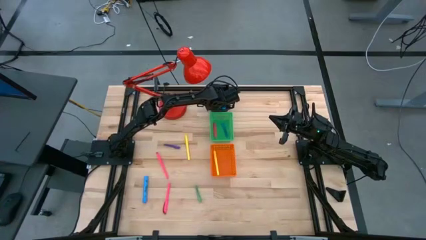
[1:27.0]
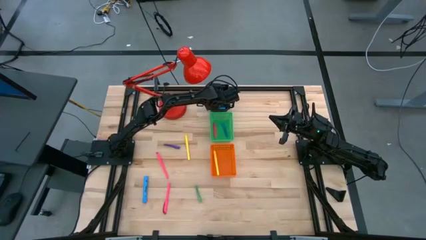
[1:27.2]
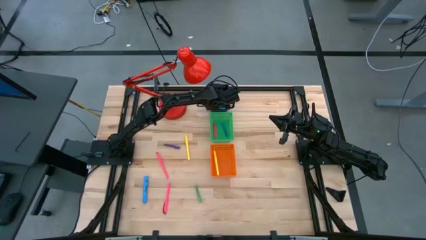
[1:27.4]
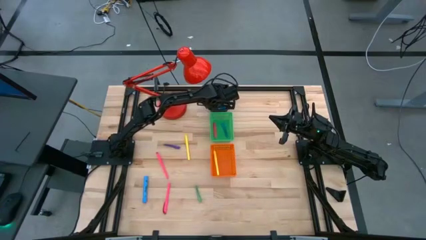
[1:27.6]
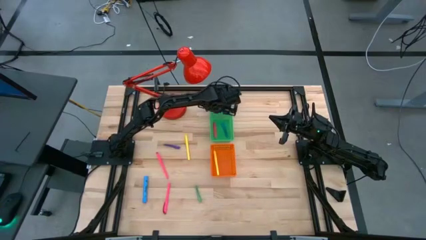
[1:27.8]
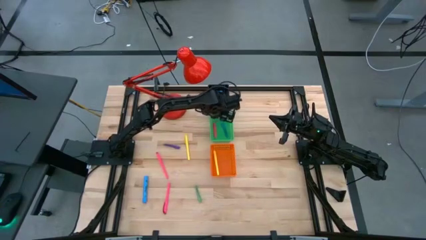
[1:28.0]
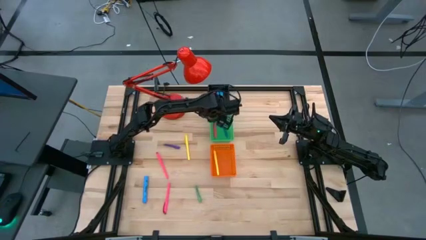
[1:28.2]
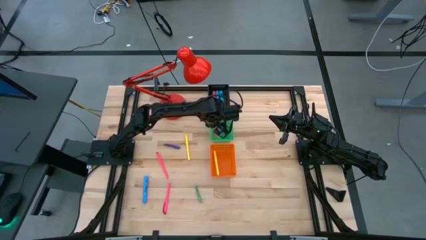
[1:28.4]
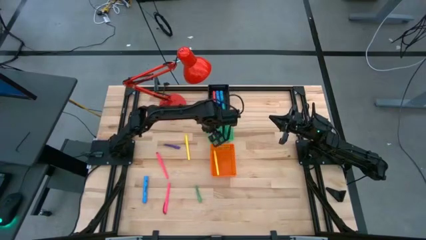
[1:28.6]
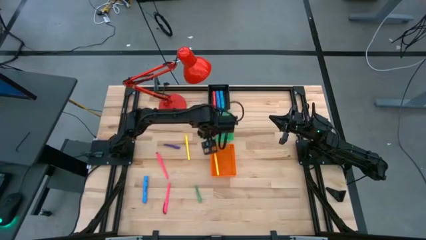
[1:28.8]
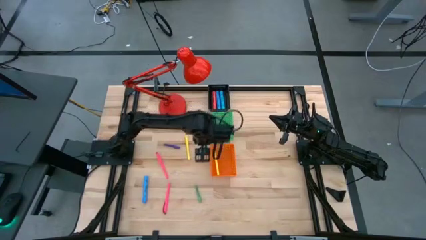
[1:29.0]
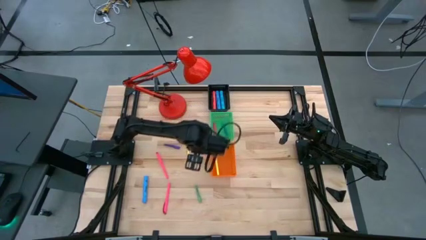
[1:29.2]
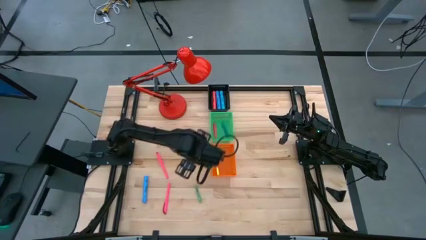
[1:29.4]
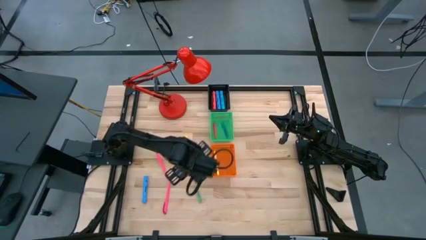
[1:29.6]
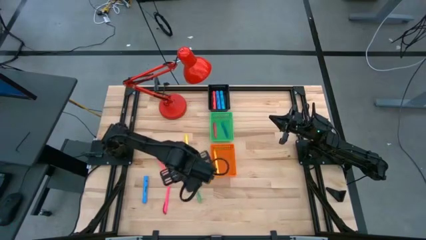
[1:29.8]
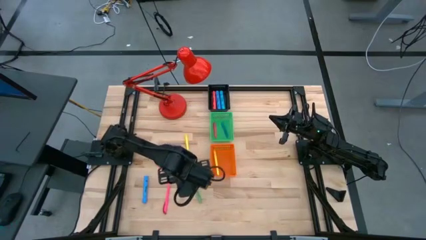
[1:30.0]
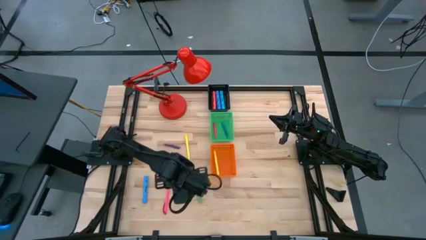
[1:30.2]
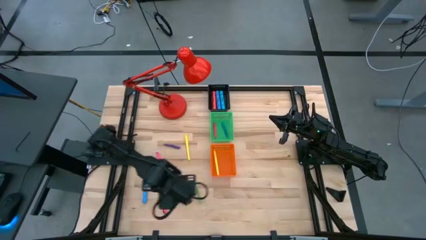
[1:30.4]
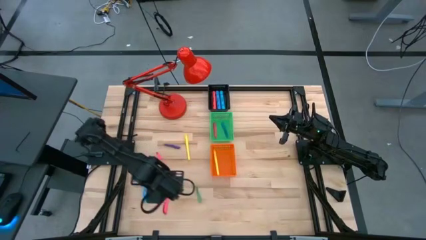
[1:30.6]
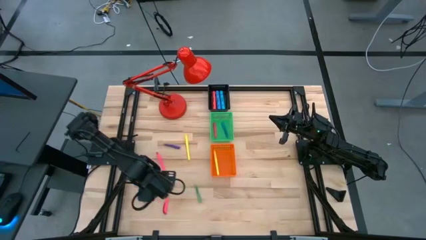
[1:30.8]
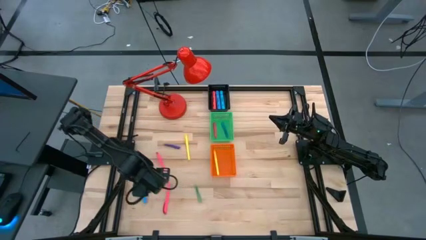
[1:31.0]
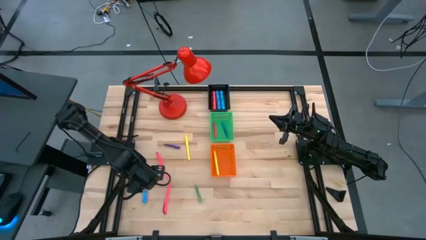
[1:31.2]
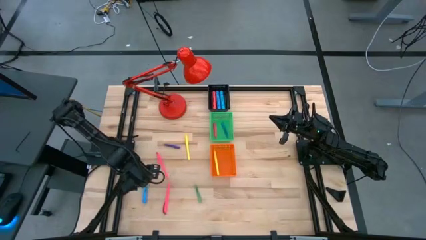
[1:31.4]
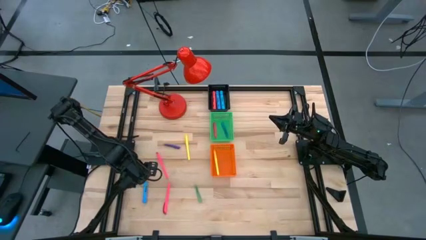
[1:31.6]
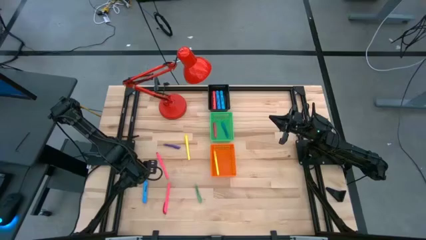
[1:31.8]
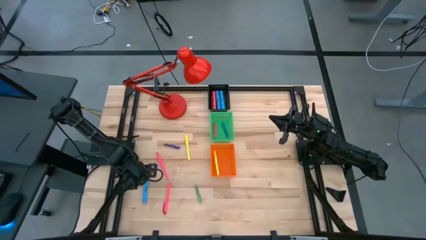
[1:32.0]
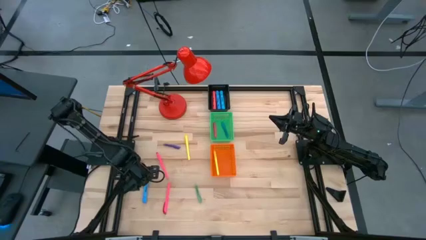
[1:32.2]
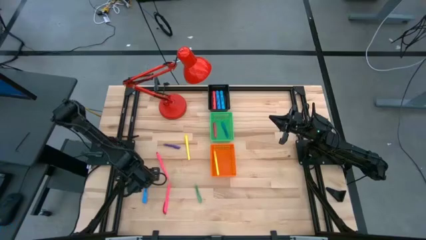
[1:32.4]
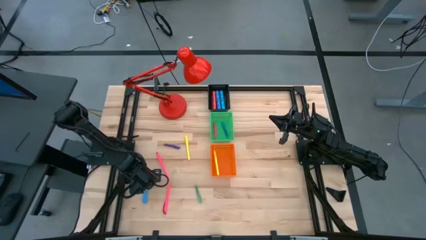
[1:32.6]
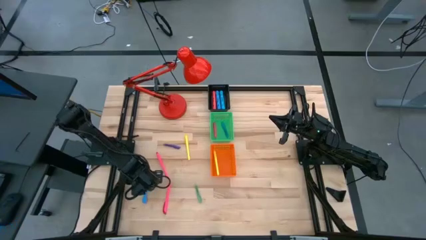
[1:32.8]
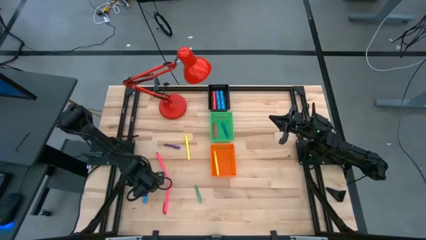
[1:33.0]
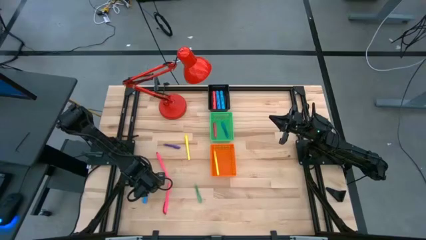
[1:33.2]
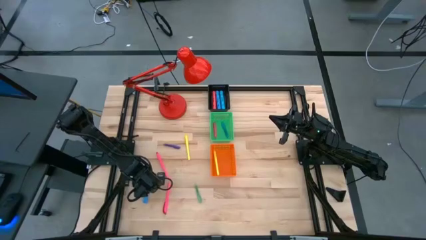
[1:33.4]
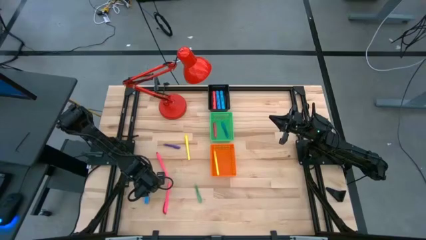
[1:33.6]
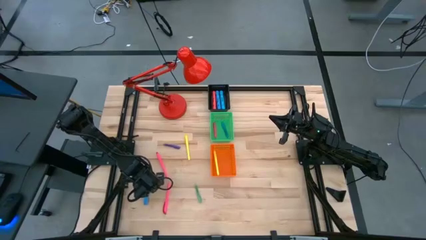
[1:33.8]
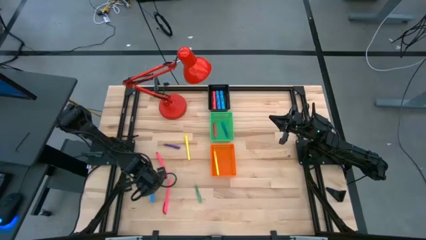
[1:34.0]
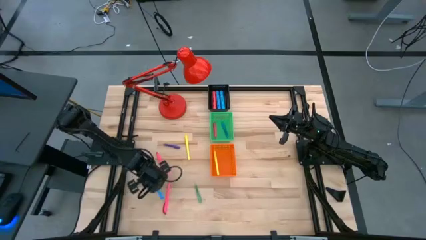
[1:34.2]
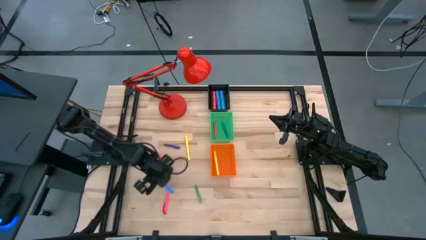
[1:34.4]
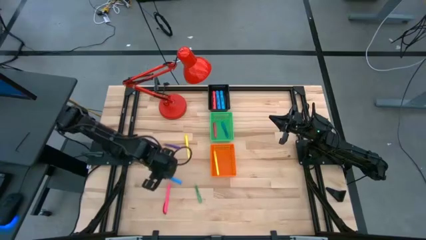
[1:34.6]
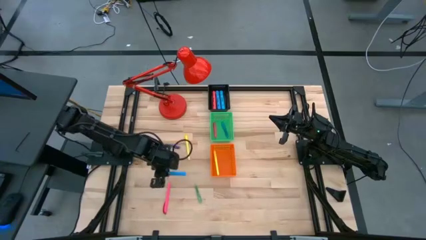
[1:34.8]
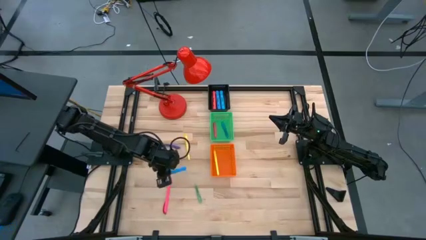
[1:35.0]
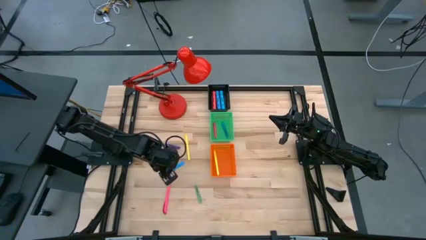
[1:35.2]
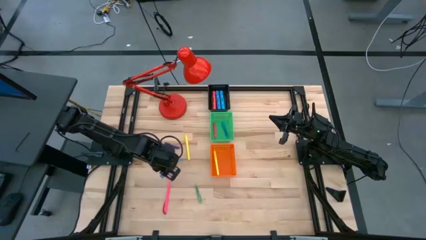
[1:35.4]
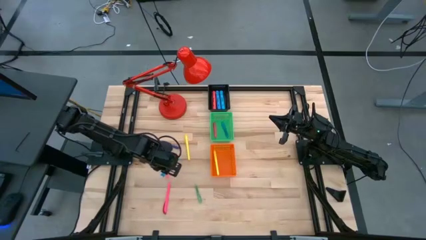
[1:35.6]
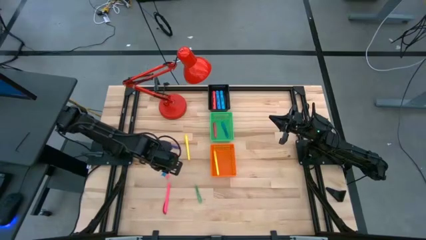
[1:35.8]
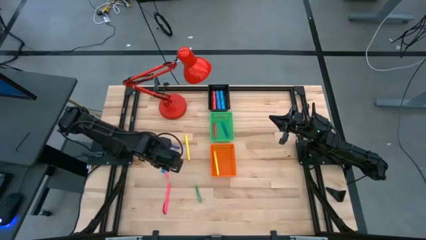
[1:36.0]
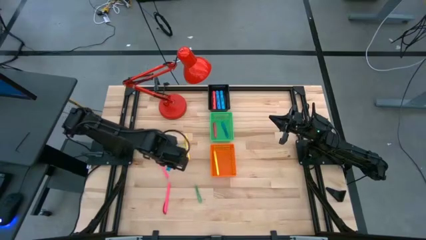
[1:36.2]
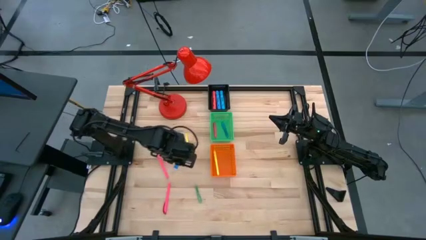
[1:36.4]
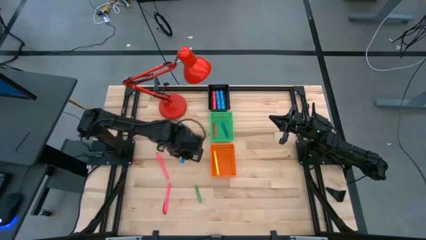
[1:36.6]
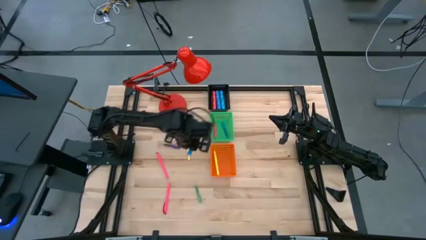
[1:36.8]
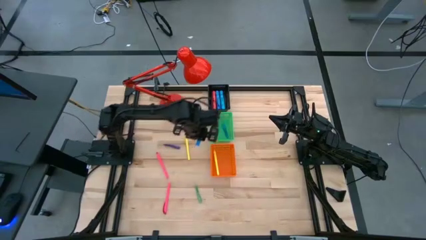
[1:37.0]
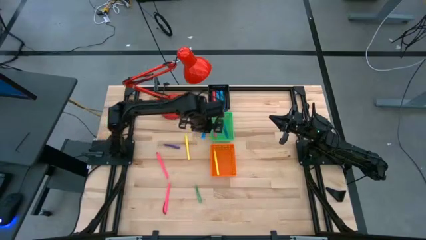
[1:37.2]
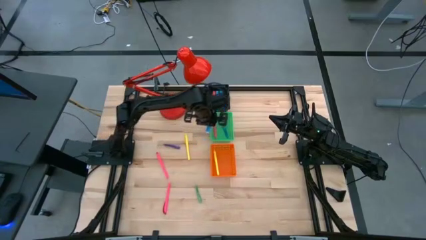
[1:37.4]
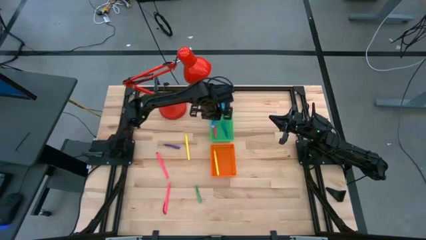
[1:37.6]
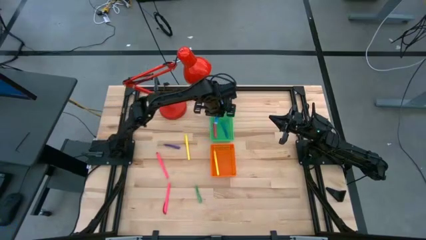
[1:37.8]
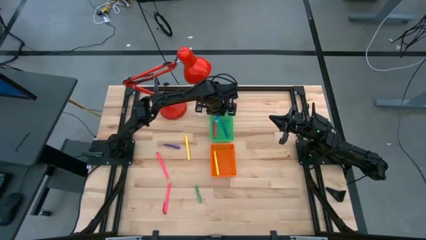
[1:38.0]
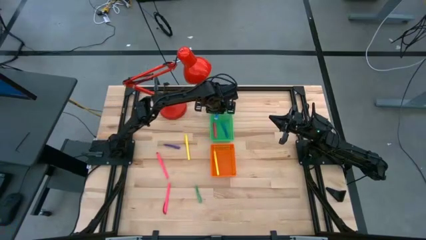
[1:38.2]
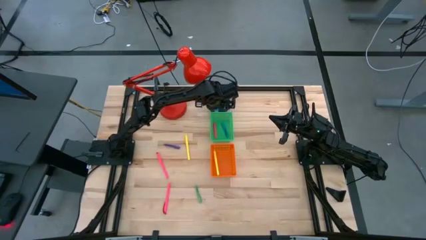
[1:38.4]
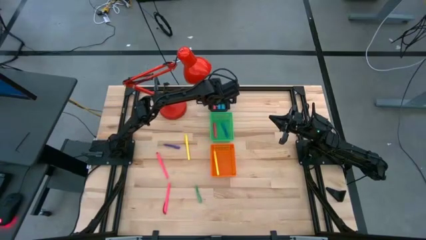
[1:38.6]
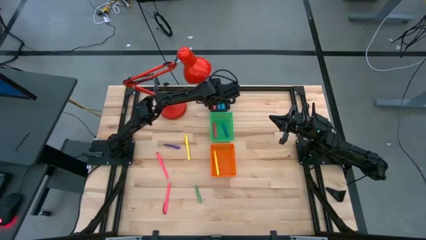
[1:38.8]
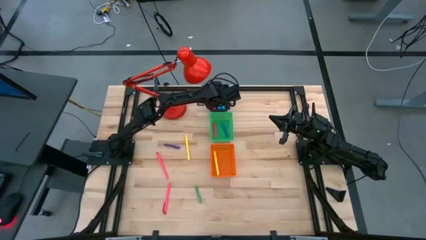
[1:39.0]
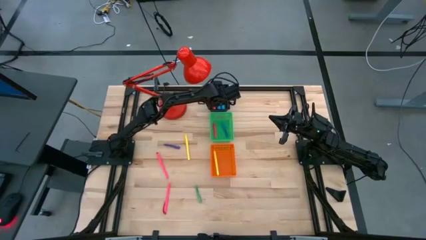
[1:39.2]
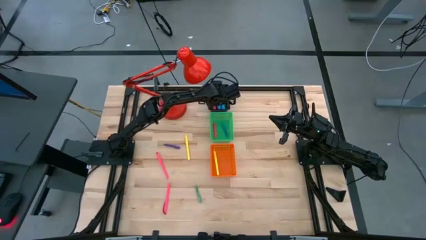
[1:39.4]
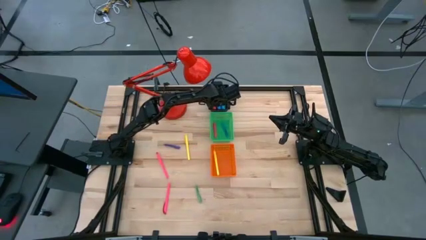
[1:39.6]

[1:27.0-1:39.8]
Task: Pick & Place Markers
Put the blue highlighter into the black bin

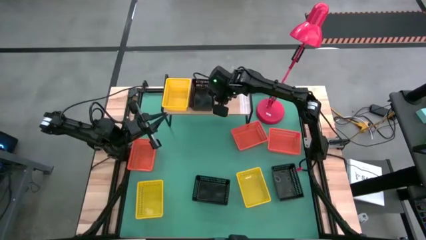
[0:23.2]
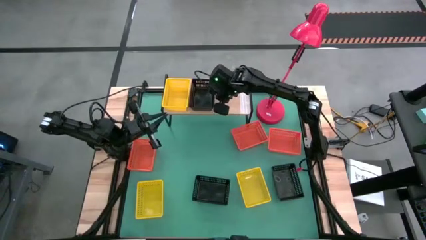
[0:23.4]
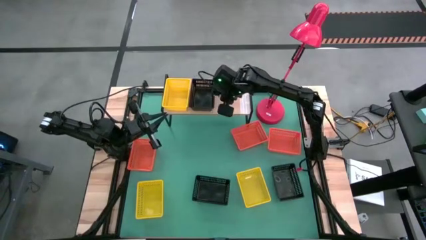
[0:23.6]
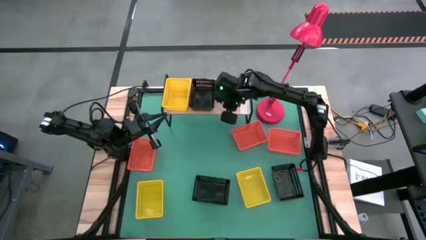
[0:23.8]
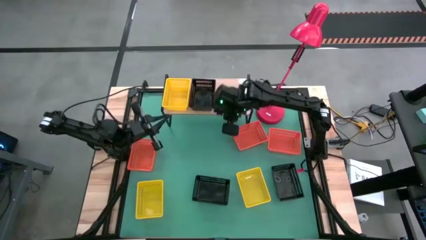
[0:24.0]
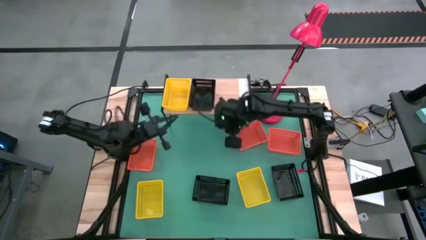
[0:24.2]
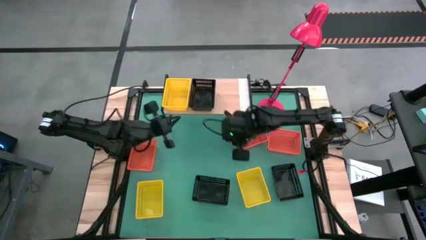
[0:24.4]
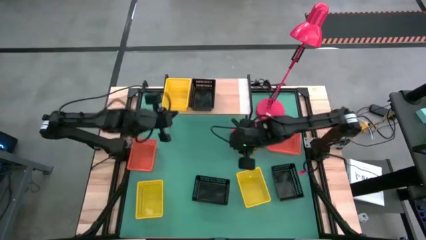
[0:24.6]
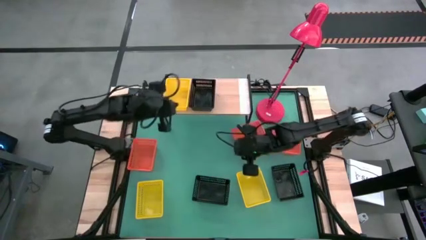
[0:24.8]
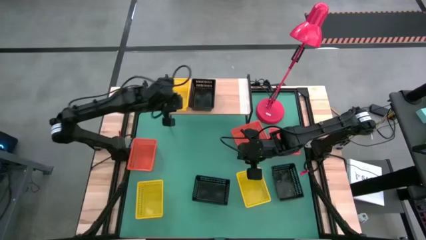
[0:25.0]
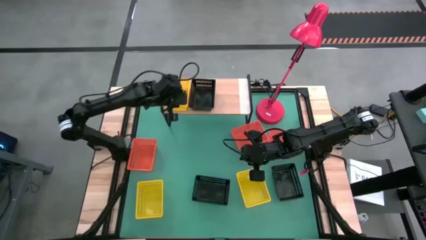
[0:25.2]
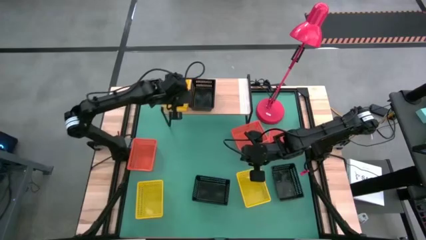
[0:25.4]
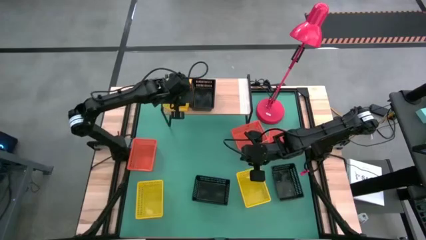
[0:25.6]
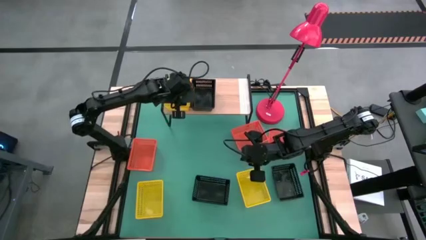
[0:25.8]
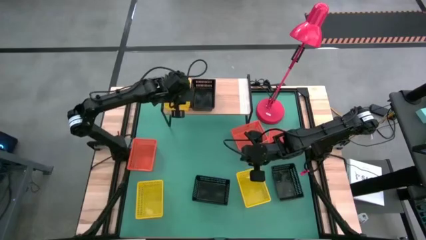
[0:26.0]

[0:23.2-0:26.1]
Task: Stack baskets on shelf by color
Adjust the yellow bin on the shelf
